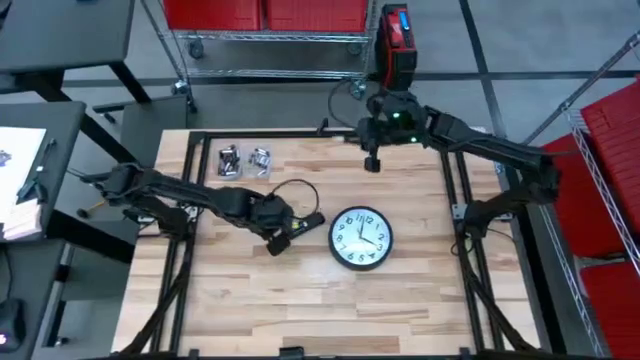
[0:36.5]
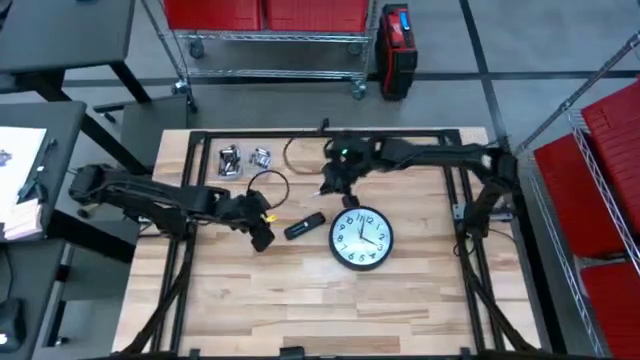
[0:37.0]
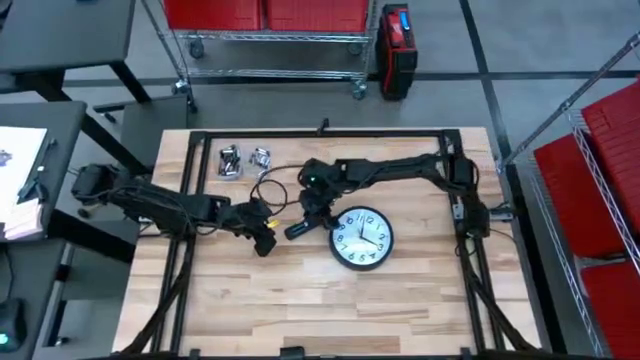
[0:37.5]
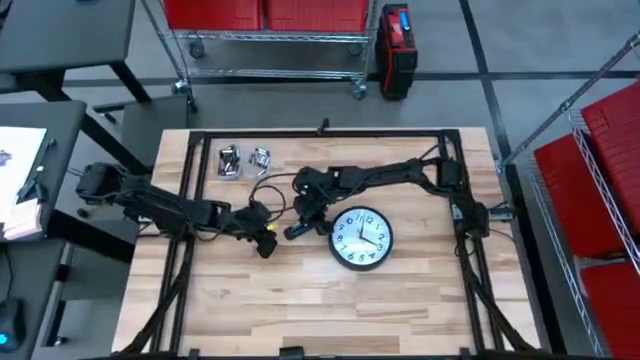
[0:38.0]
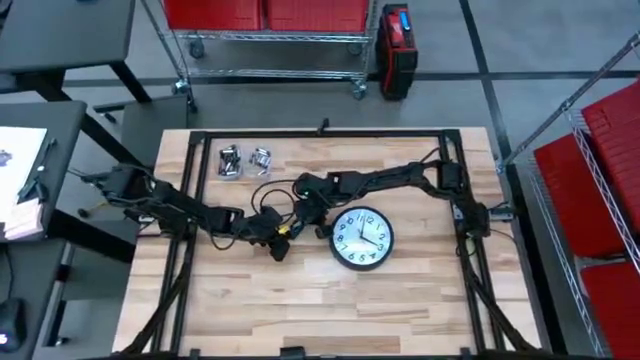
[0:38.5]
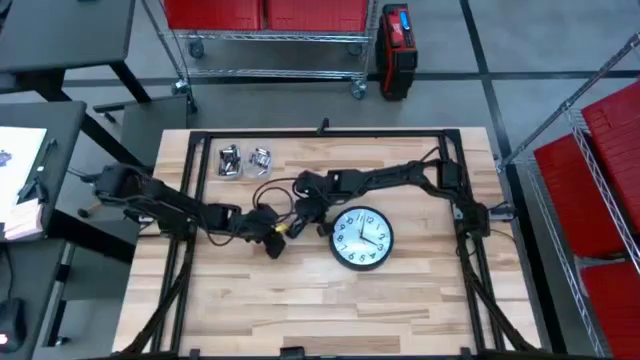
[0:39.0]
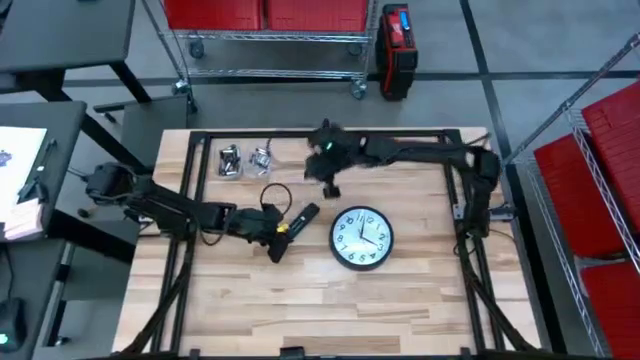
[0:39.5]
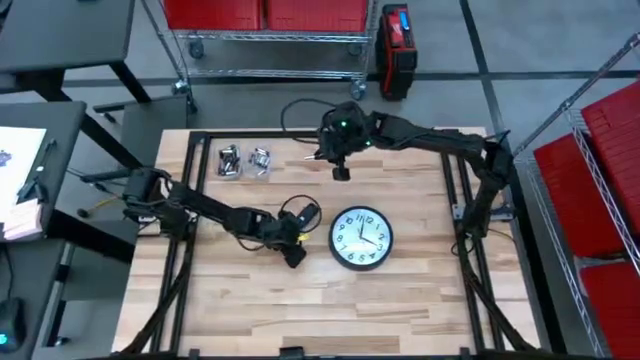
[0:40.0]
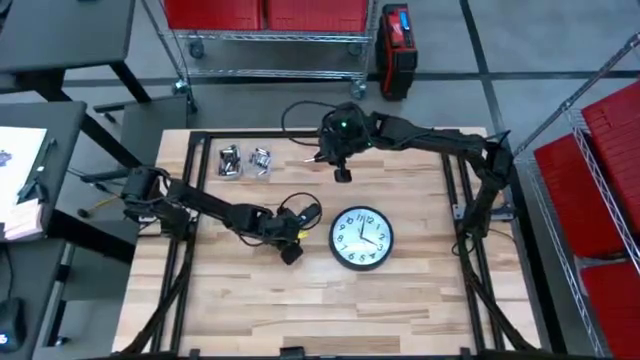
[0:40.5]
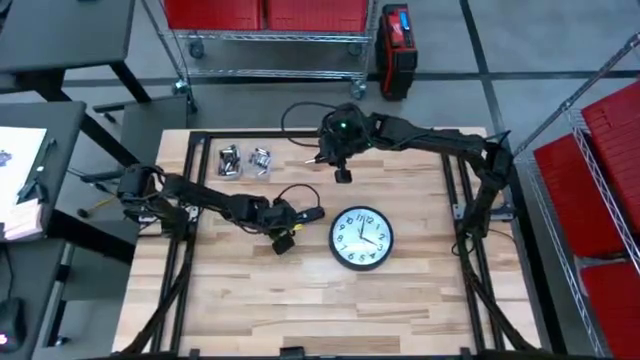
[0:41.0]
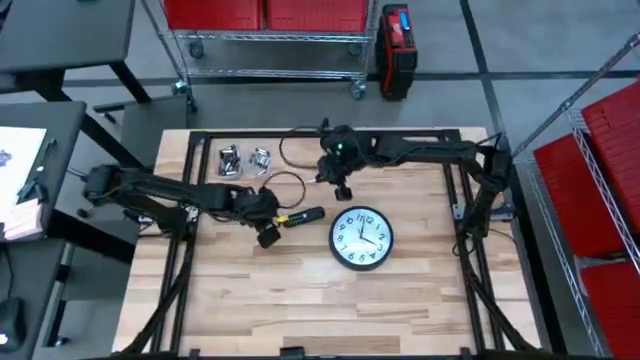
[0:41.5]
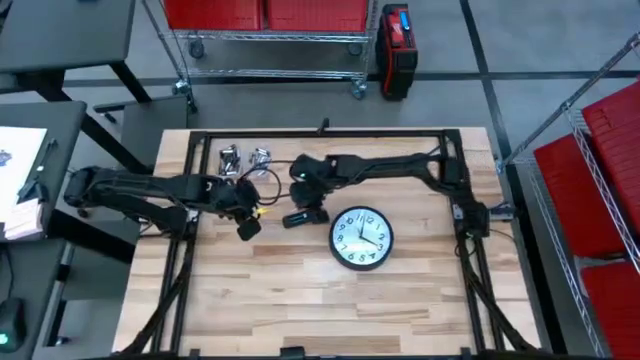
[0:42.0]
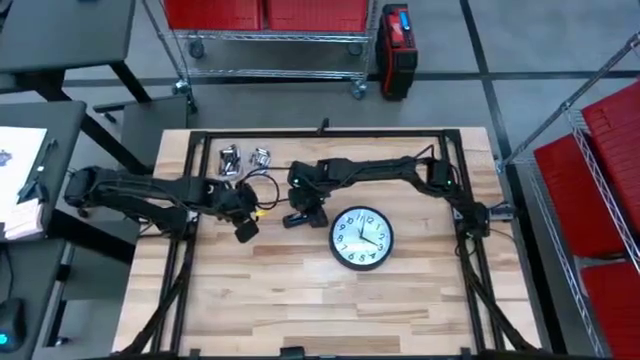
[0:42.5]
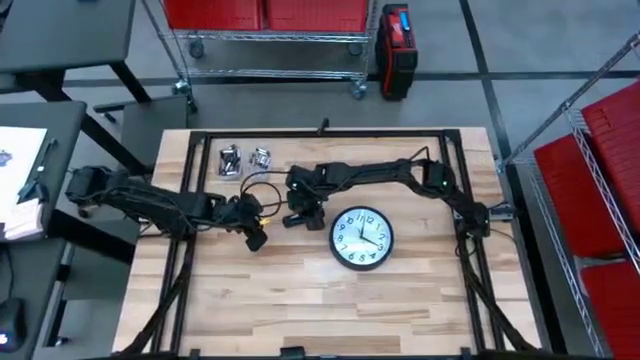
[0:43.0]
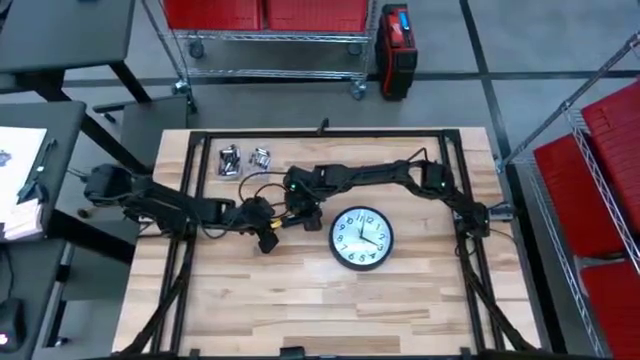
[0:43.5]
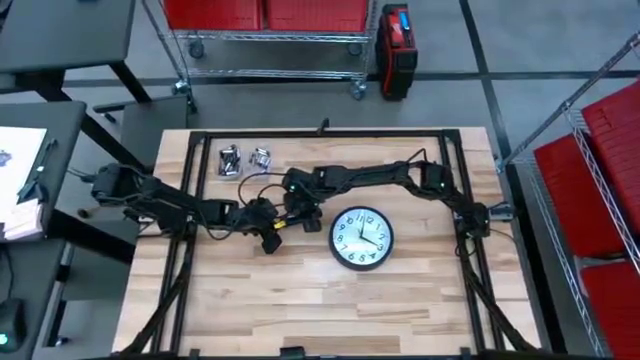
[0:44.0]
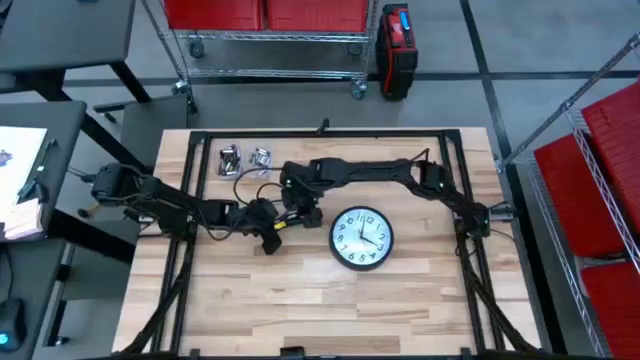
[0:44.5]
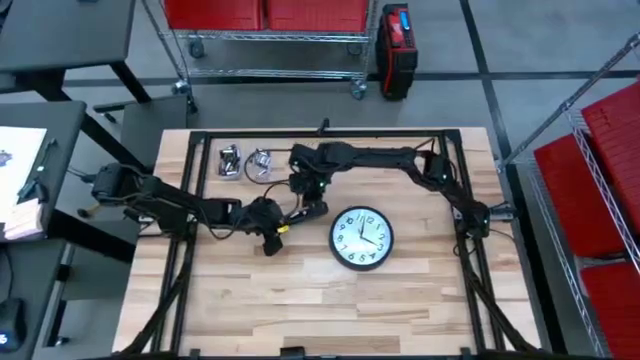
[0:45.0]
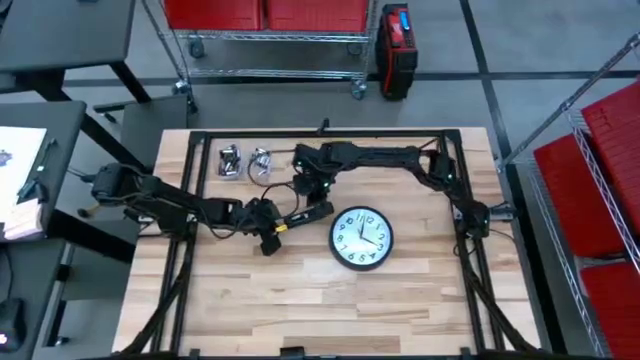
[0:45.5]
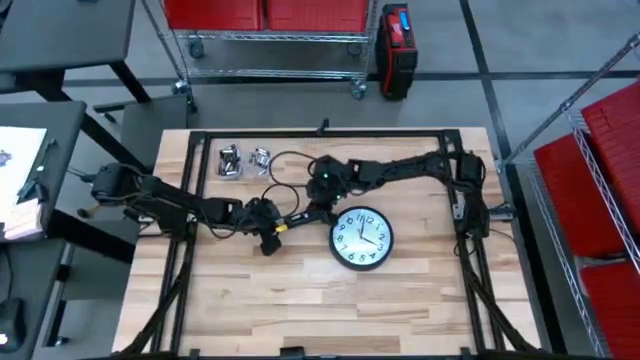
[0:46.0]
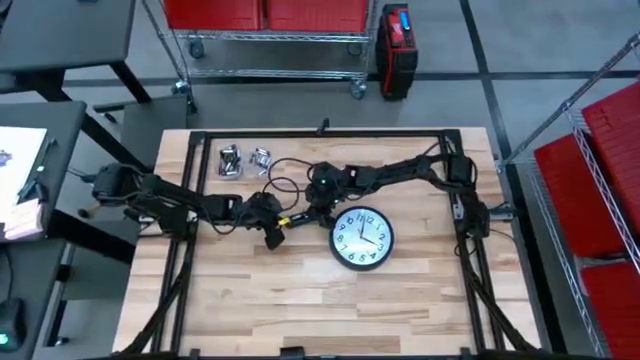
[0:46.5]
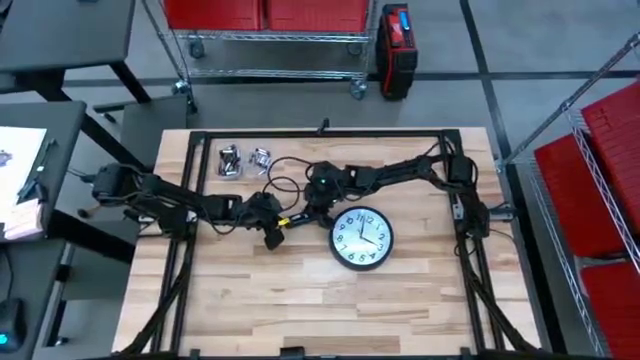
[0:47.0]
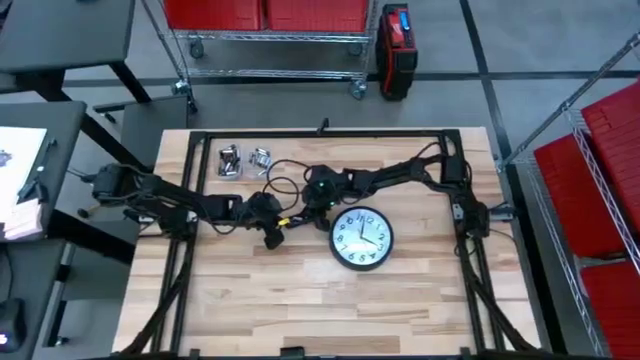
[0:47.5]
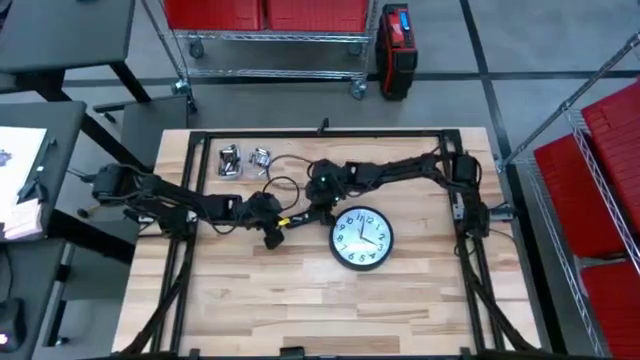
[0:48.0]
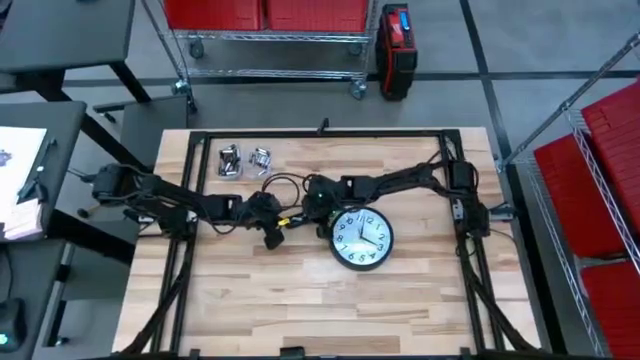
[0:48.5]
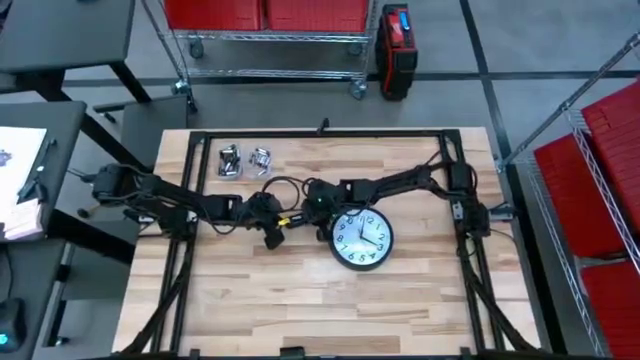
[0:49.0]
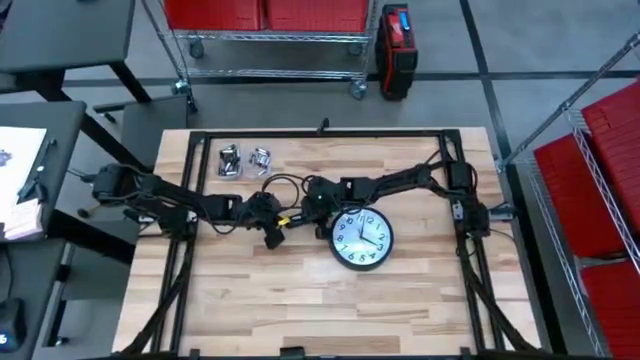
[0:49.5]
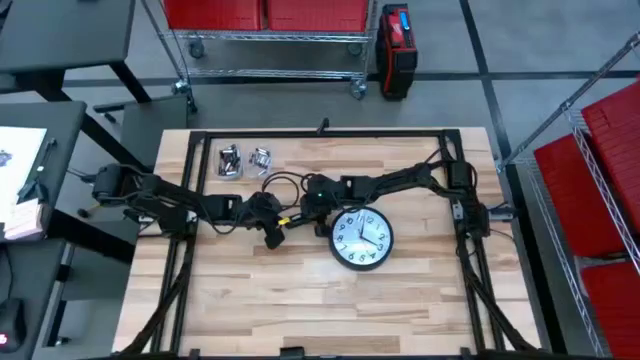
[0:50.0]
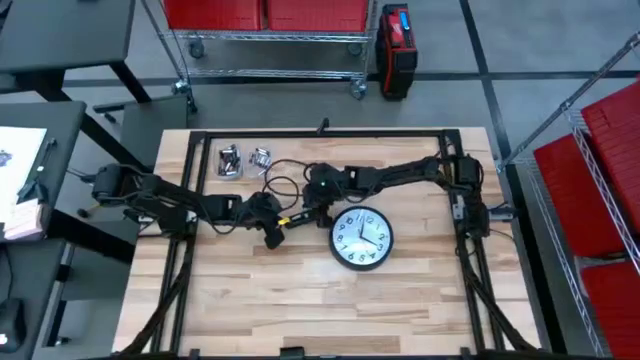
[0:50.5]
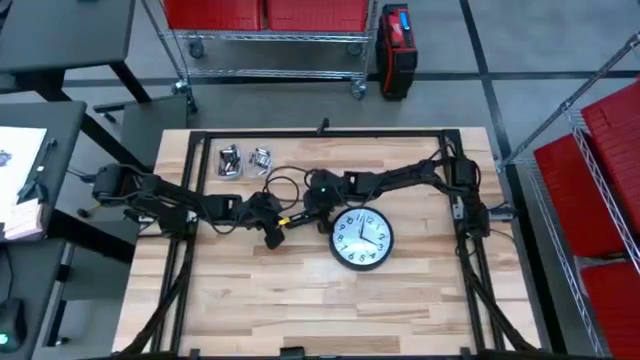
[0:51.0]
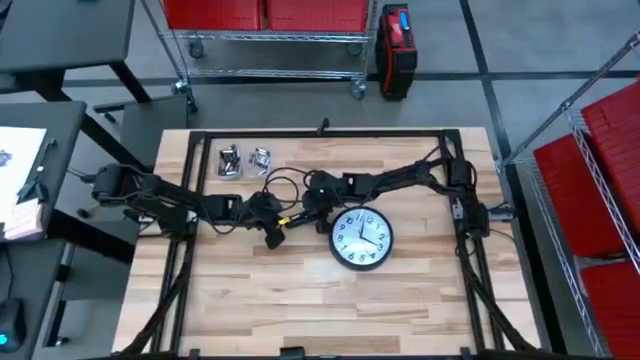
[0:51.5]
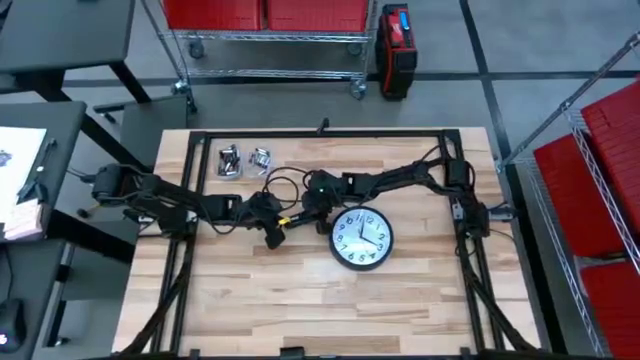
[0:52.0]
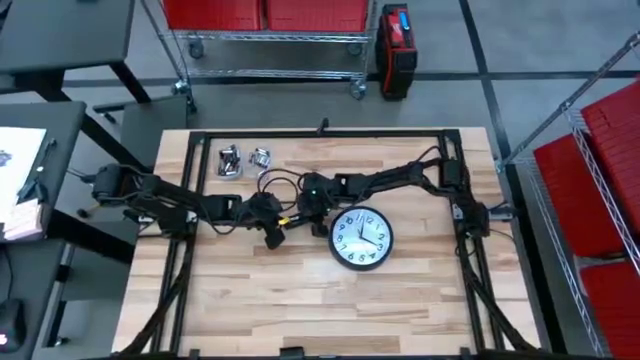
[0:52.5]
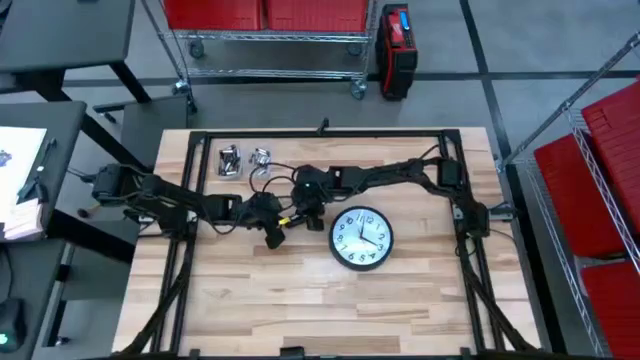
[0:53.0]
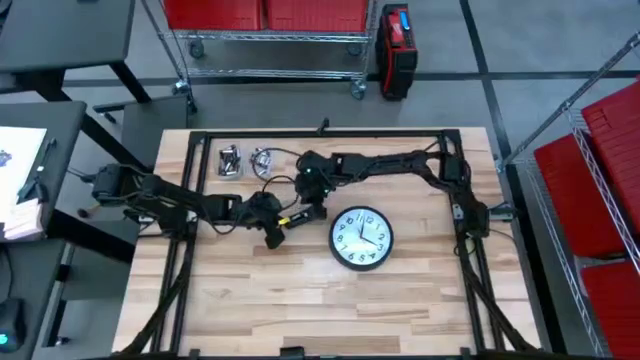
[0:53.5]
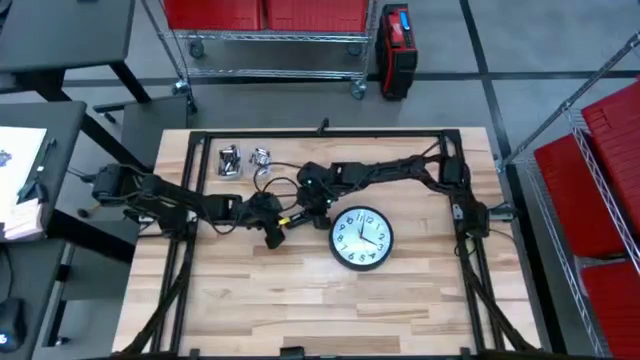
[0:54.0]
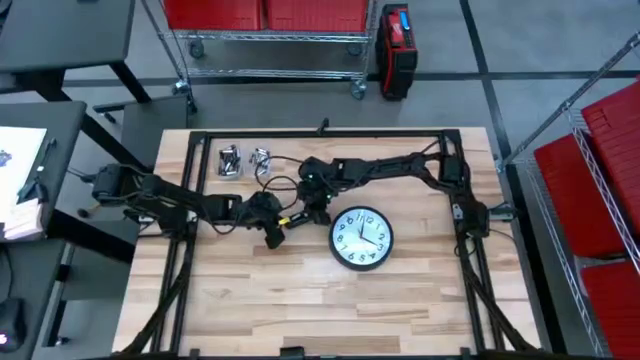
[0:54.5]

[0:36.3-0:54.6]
Task: Insert battery
Insert the silver battery into the remote
